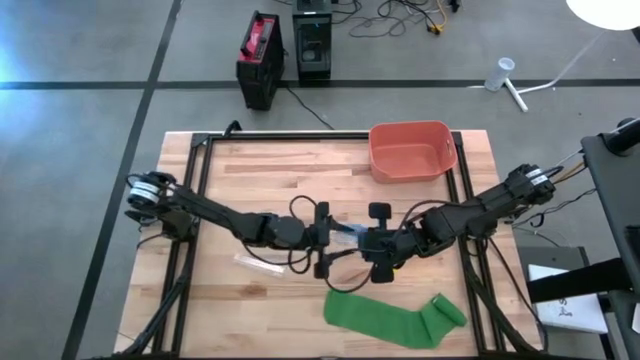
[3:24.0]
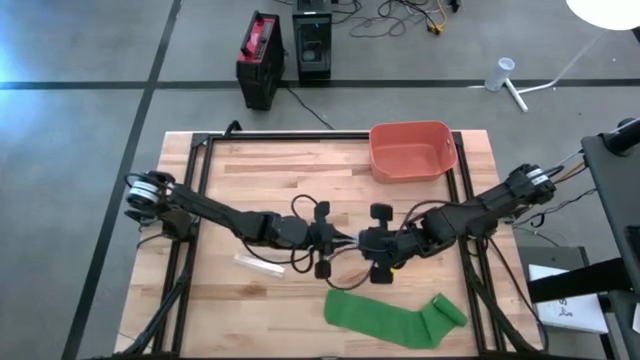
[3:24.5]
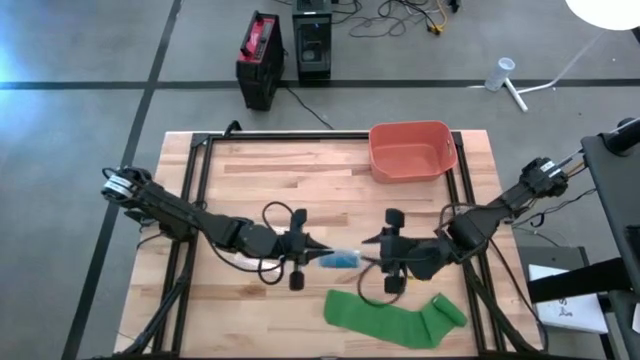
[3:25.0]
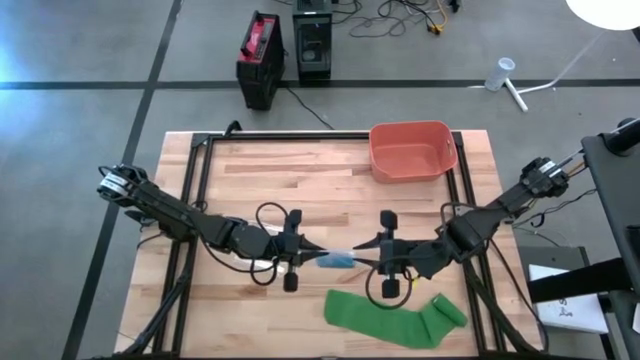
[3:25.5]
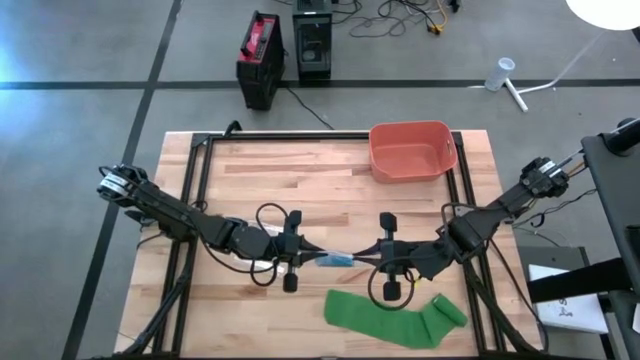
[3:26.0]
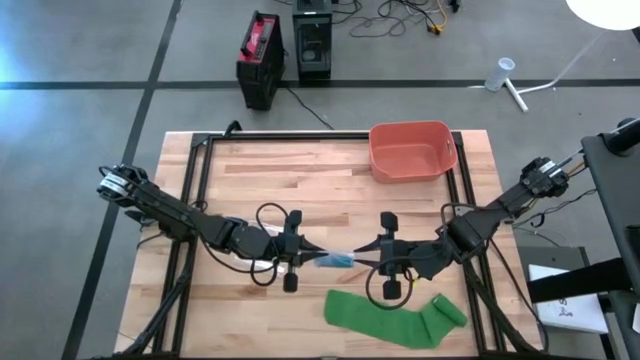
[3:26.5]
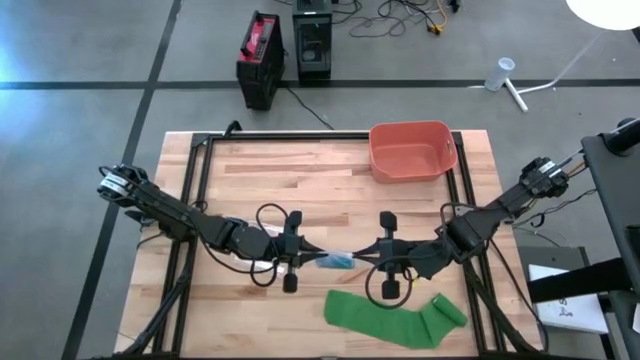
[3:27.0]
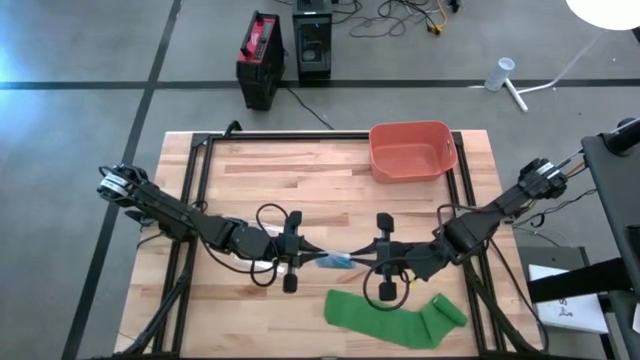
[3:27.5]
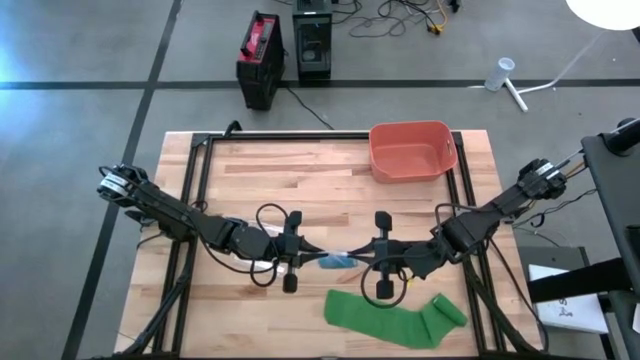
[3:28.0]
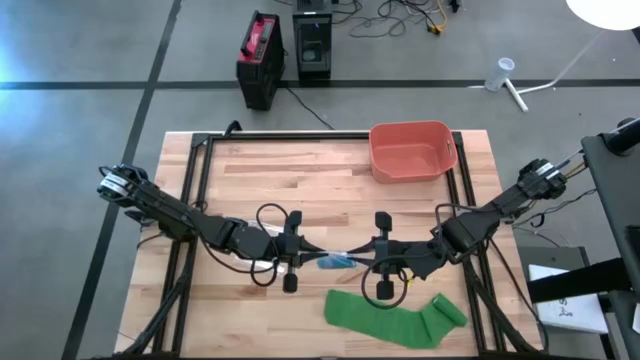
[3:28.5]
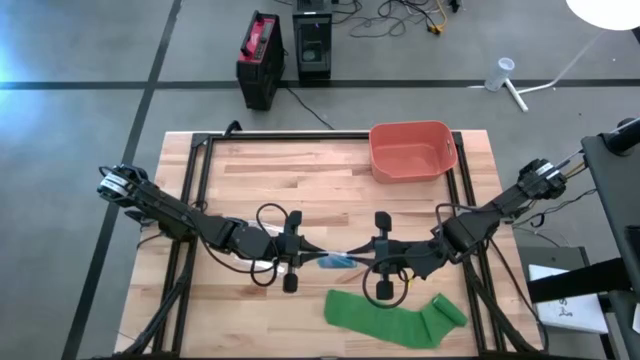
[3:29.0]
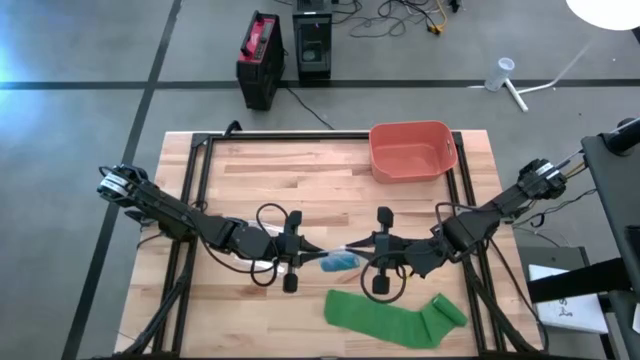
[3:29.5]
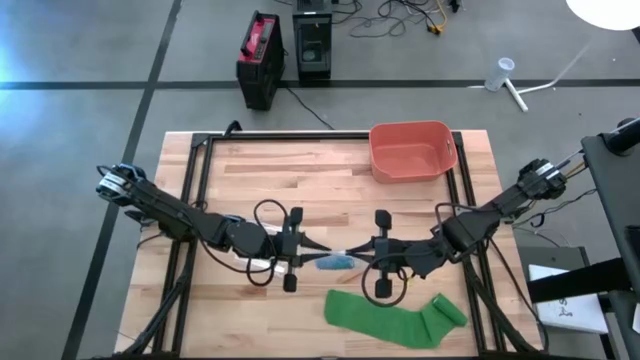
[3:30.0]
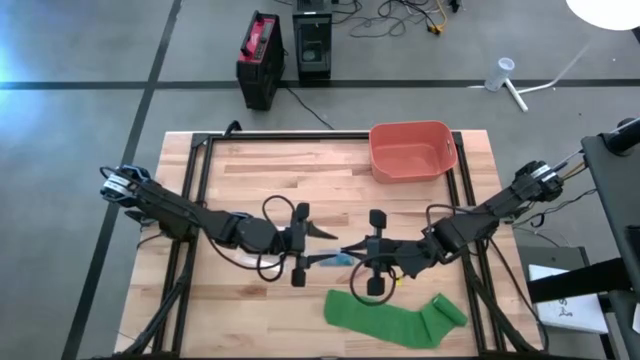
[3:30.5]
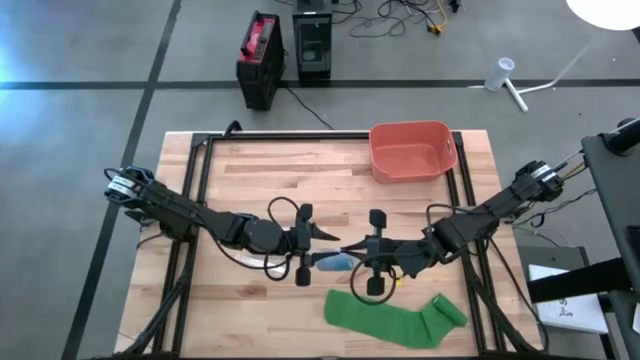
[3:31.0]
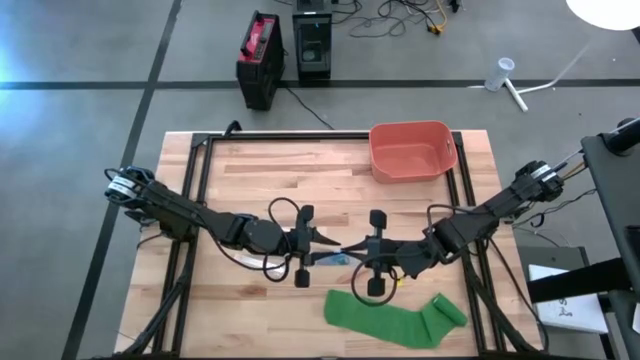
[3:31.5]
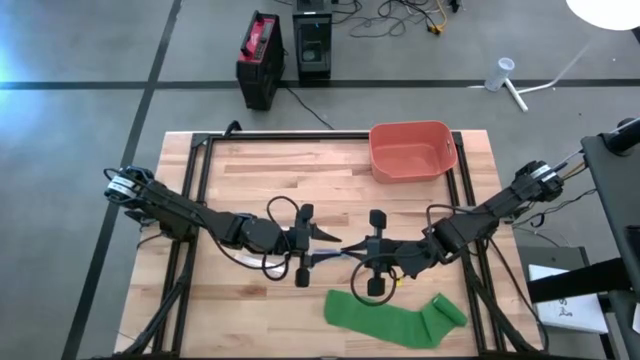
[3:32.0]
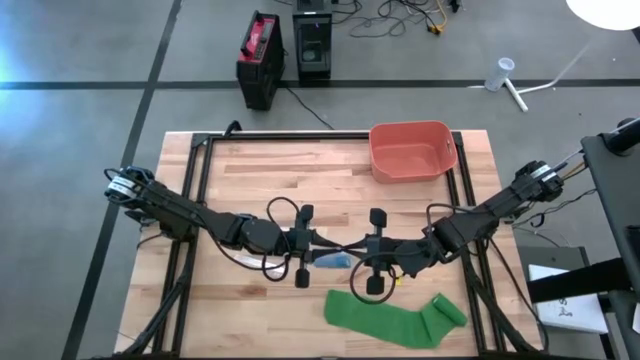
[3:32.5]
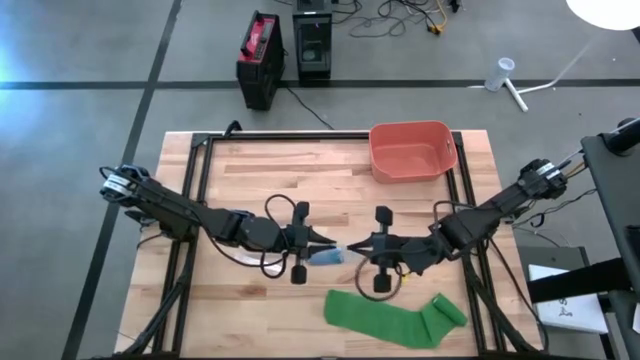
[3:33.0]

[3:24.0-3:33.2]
Task: Roll bandage
Close the transparent zip bag

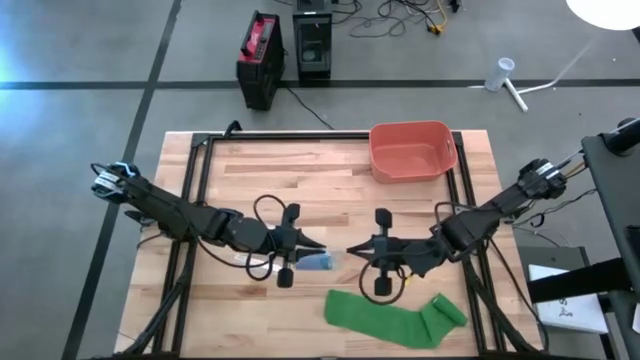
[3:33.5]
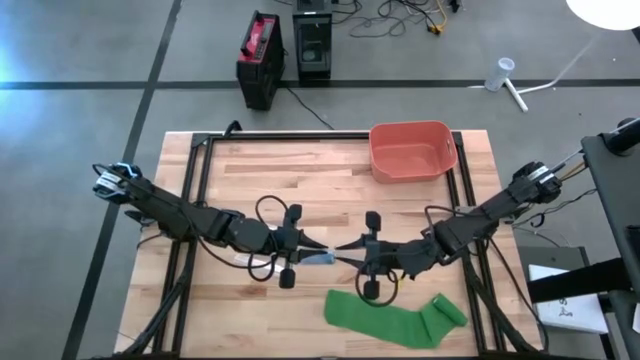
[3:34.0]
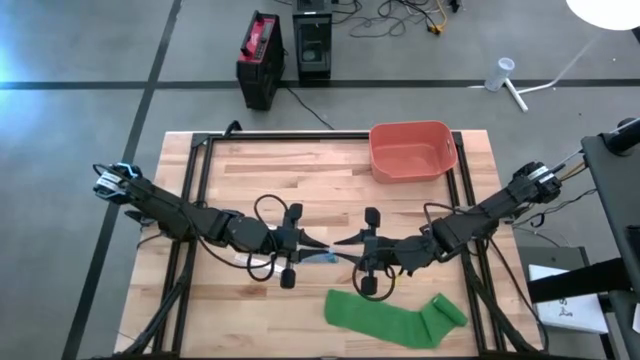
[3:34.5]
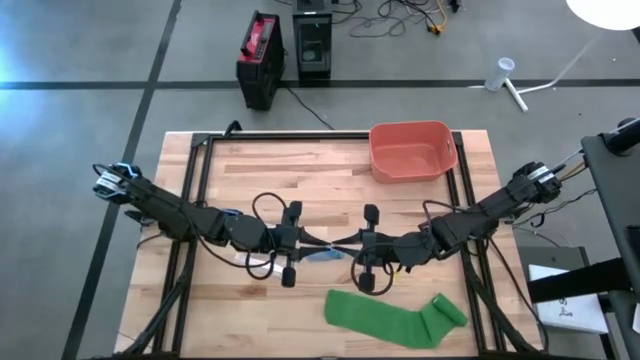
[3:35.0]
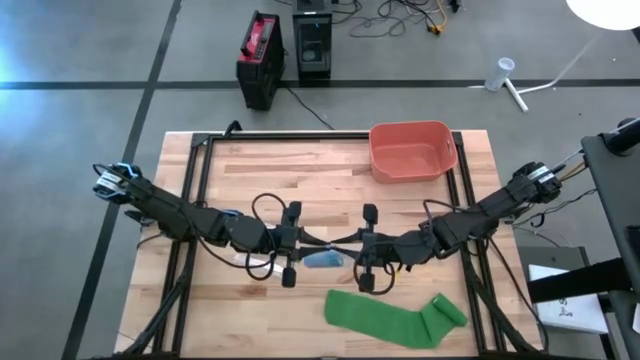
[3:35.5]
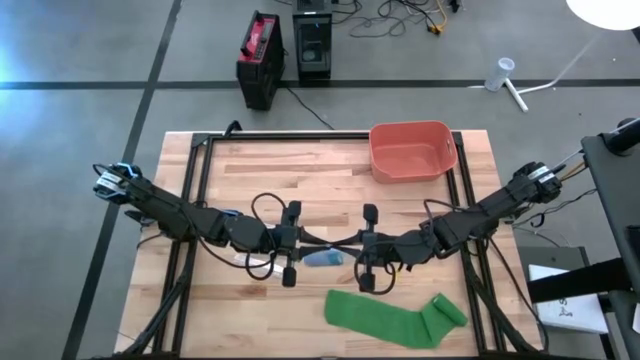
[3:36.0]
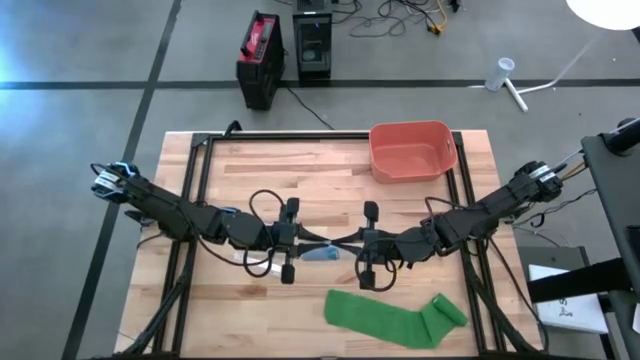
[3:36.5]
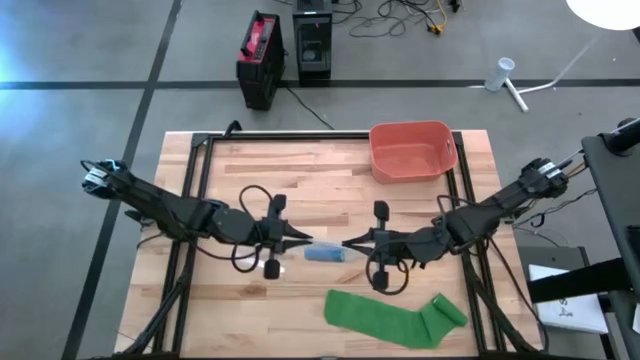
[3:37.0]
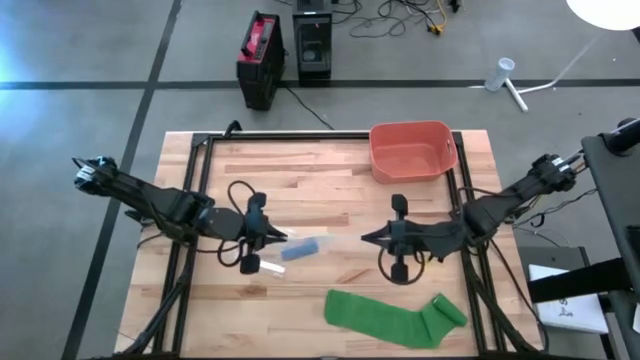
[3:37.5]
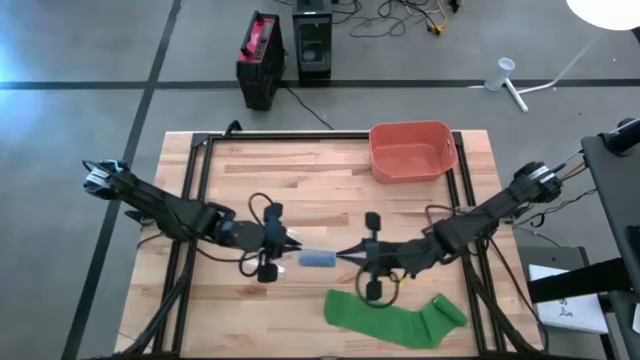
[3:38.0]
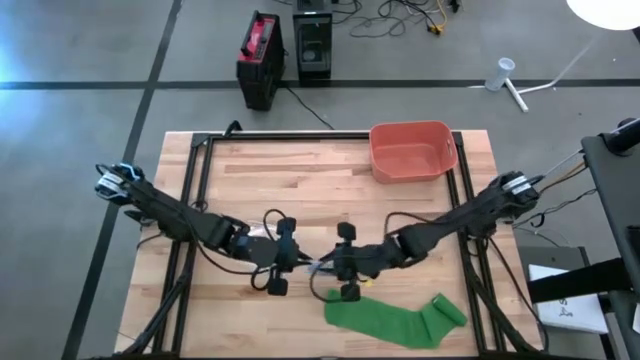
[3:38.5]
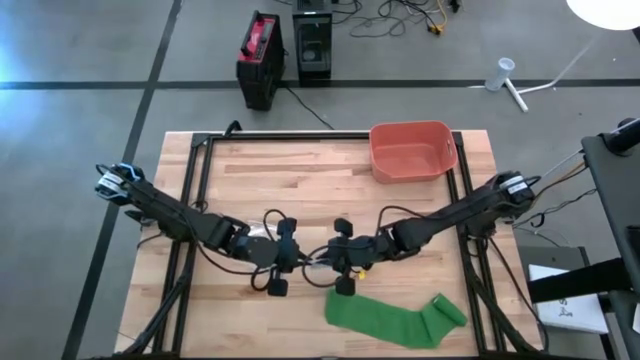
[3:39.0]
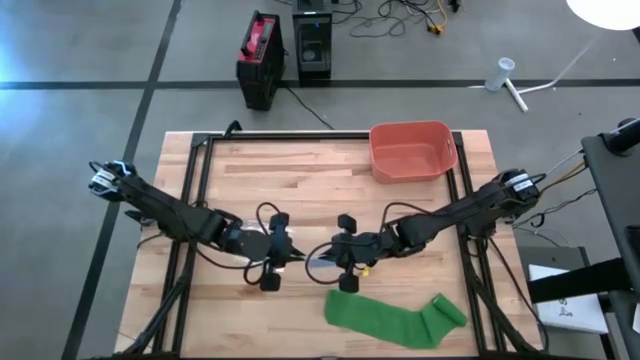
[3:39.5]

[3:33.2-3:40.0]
Close the transparent zip bag

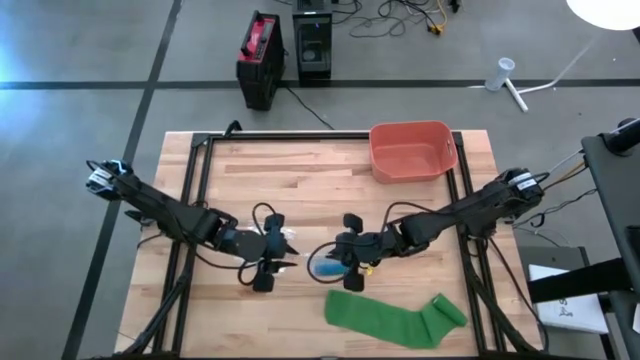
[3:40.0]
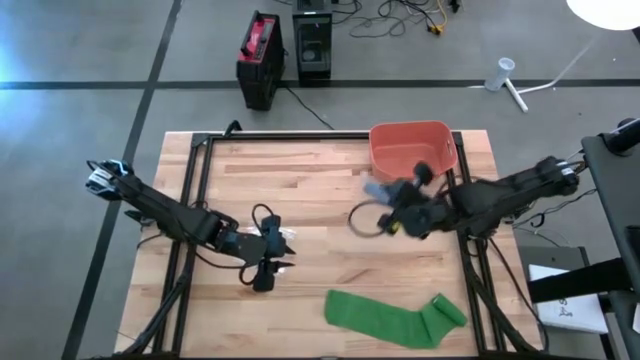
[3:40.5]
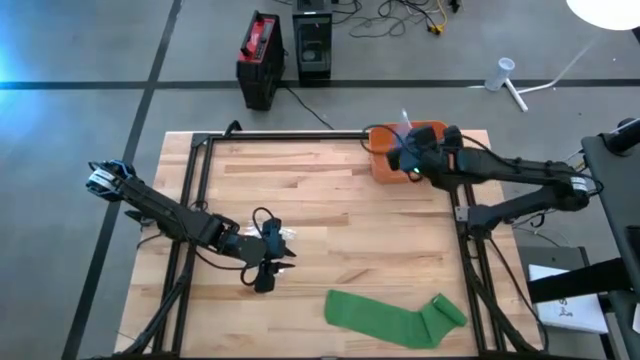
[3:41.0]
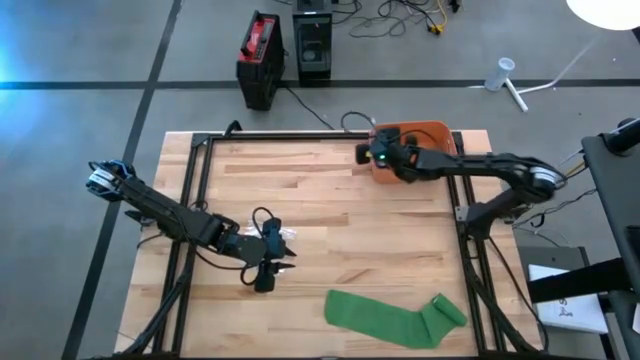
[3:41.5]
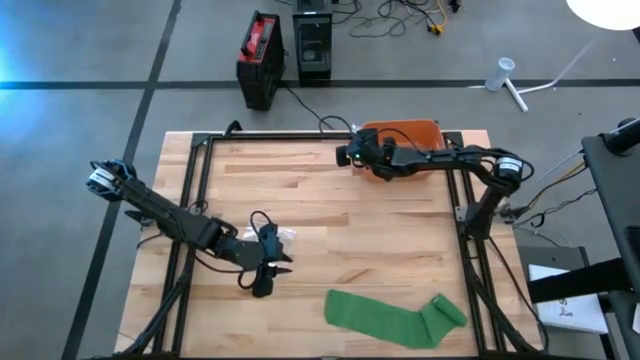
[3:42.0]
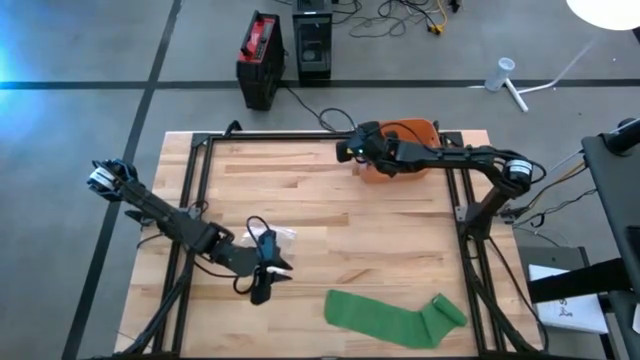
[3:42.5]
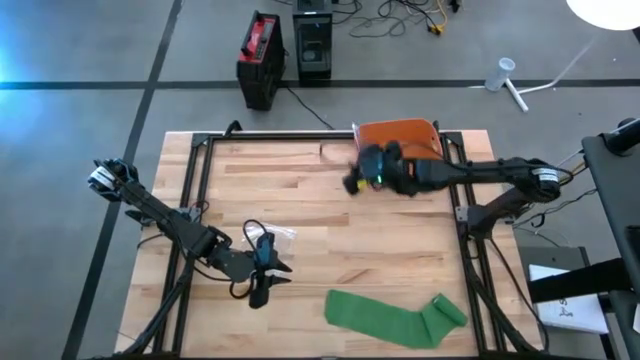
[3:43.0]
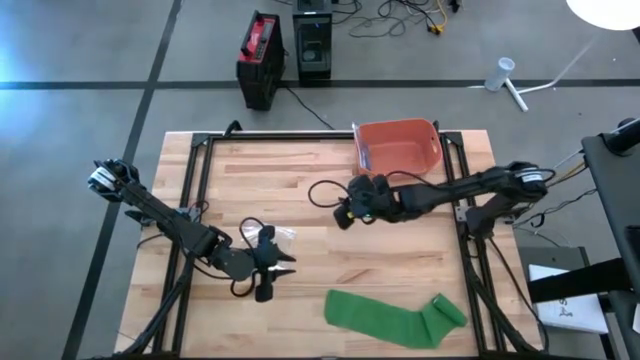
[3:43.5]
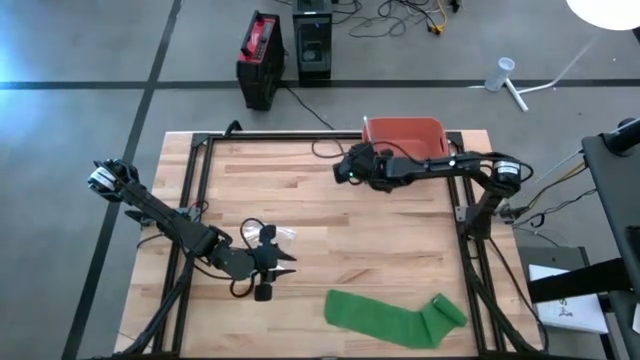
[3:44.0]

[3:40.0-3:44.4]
Put the transparent zip bag into the orange bin
